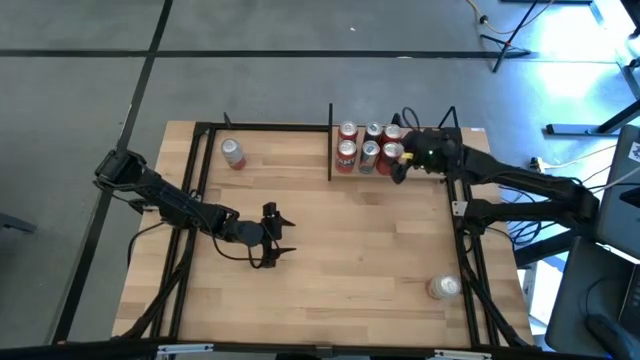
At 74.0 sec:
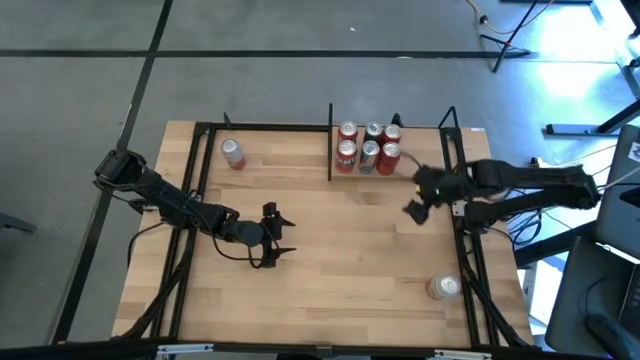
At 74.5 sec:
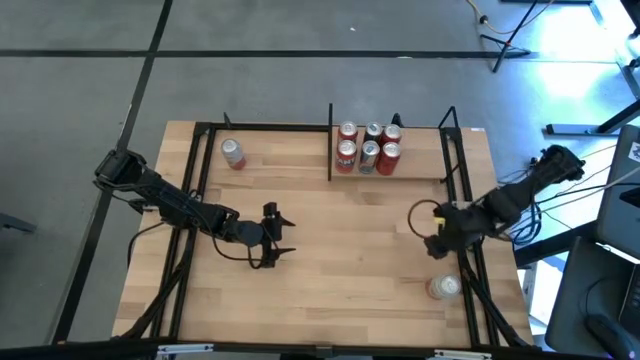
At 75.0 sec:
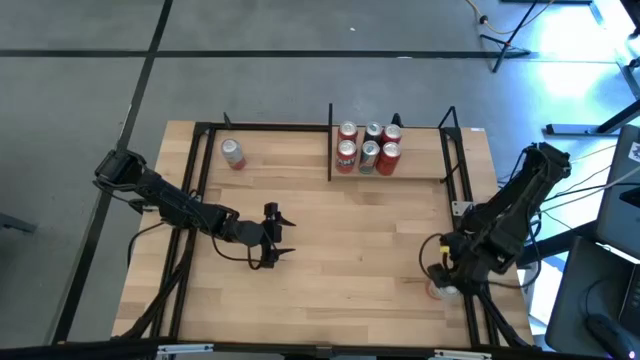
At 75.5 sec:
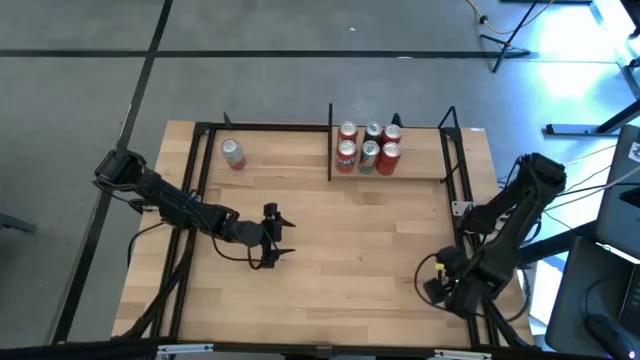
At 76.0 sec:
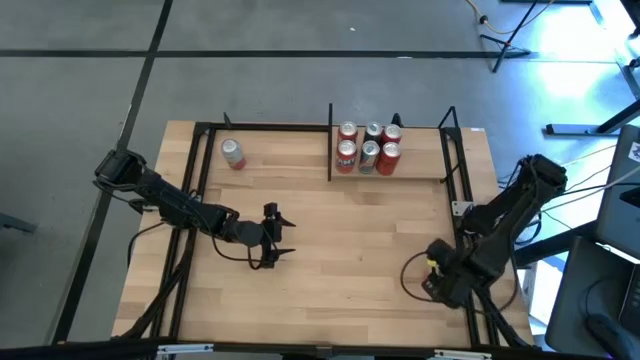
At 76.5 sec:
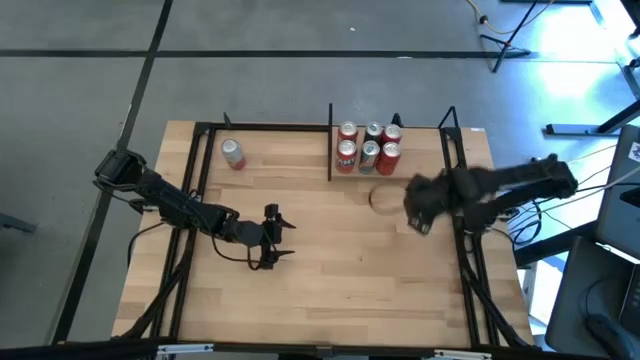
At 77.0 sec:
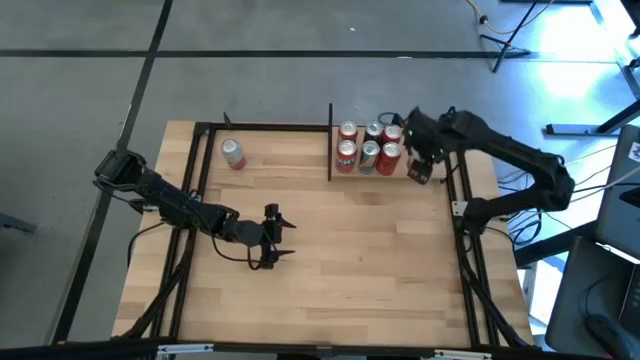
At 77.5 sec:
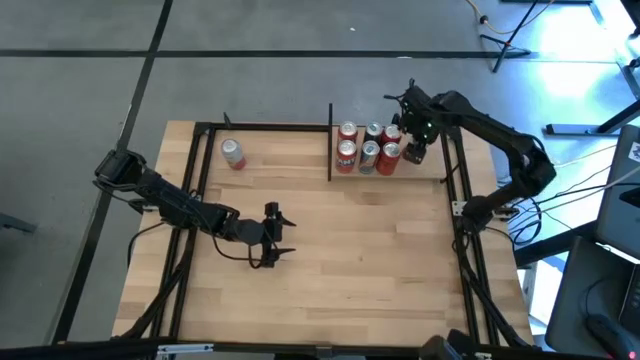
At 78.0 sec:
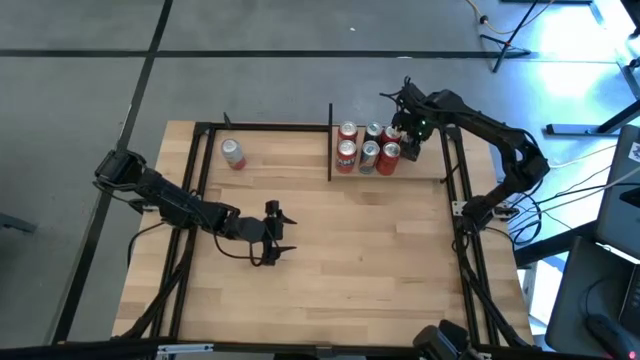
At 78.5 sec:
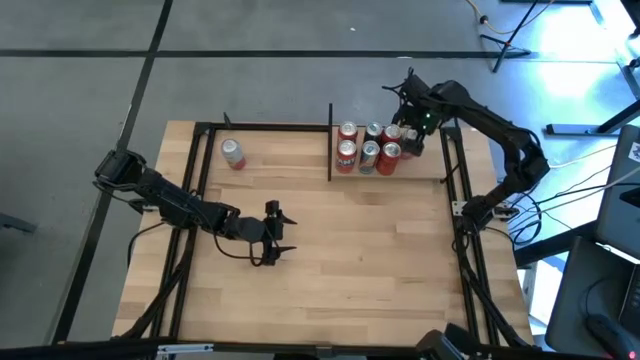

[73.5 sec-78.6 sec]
Task: Place canned beverage on shelf
Put the bottom pink soda can on the shelf

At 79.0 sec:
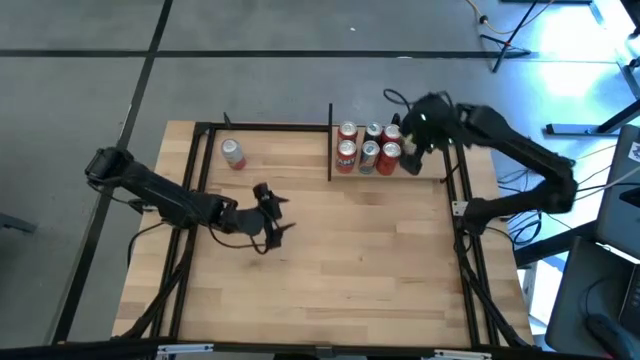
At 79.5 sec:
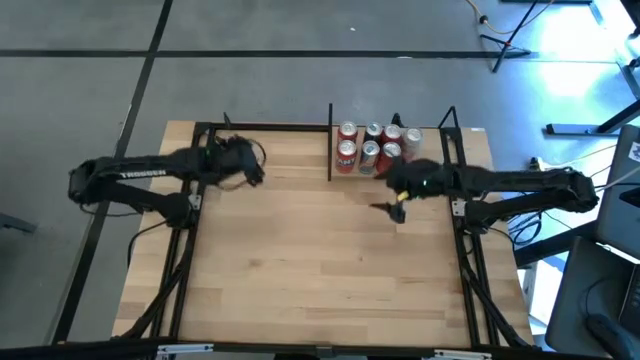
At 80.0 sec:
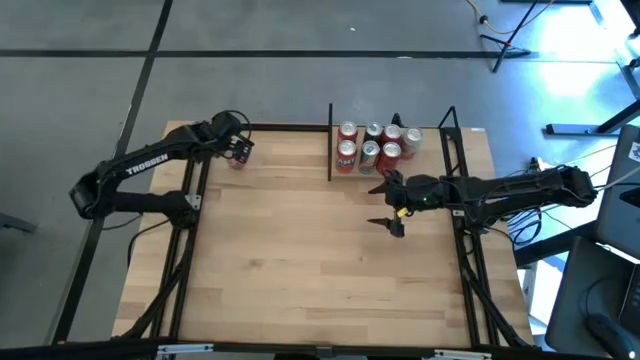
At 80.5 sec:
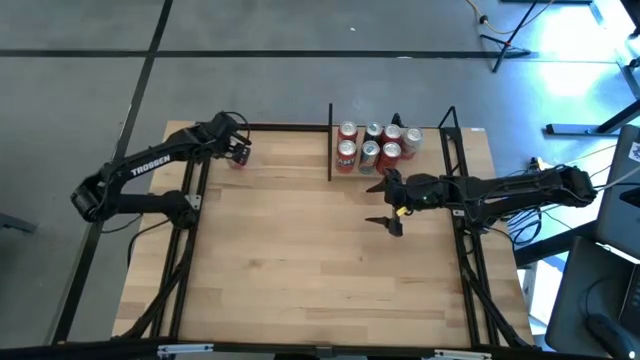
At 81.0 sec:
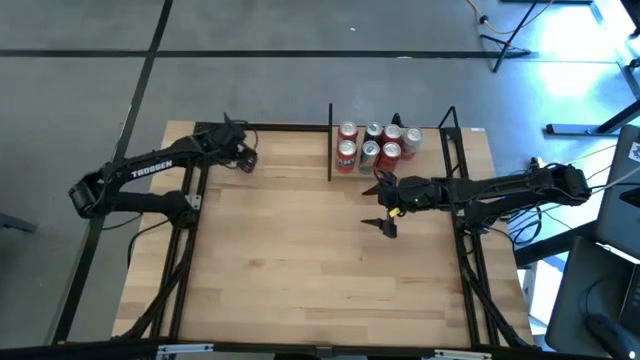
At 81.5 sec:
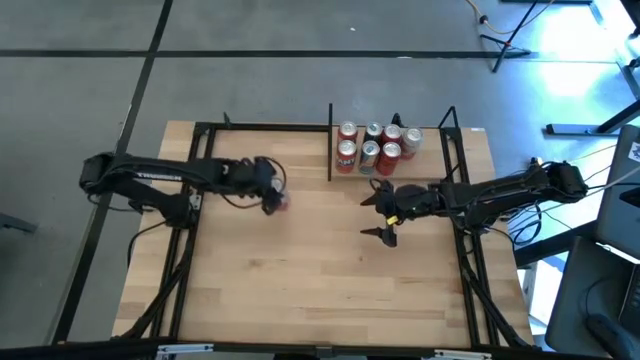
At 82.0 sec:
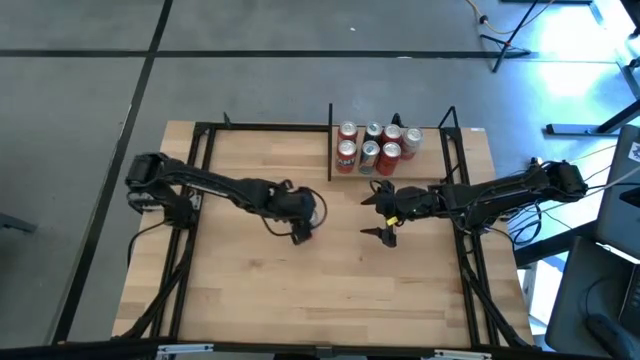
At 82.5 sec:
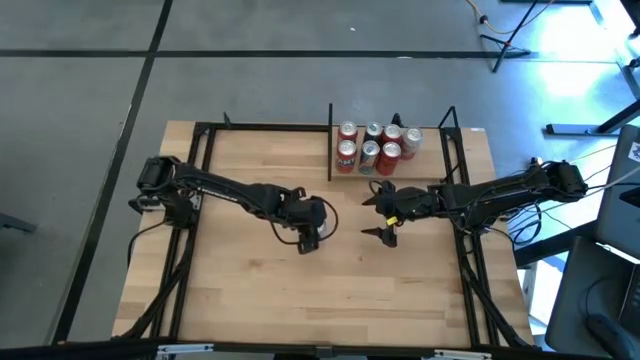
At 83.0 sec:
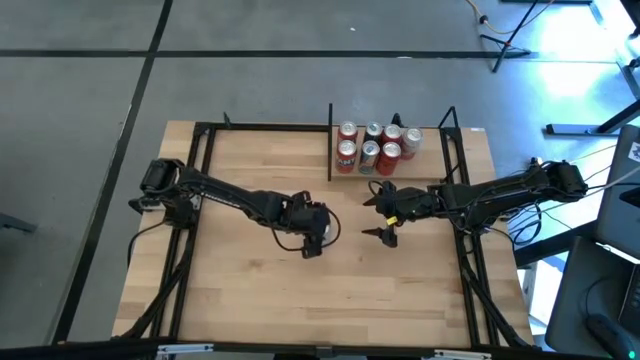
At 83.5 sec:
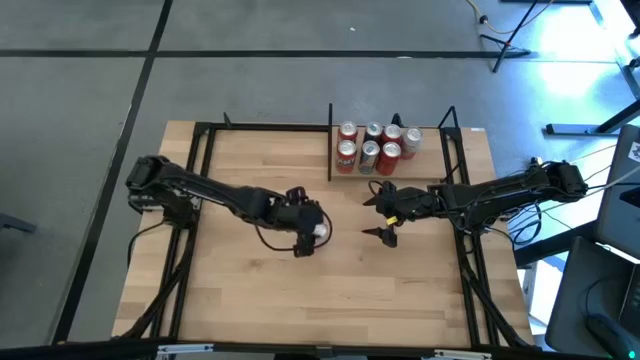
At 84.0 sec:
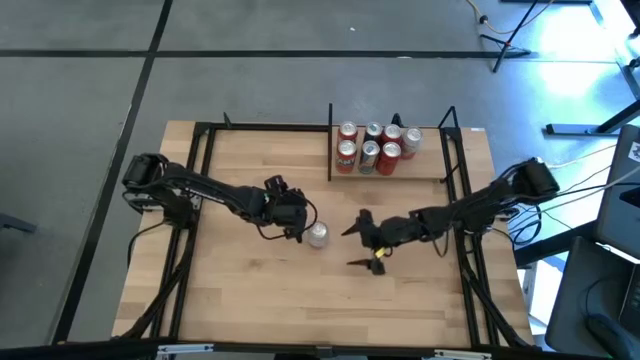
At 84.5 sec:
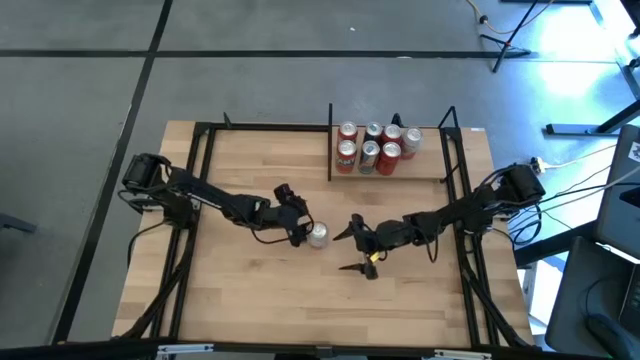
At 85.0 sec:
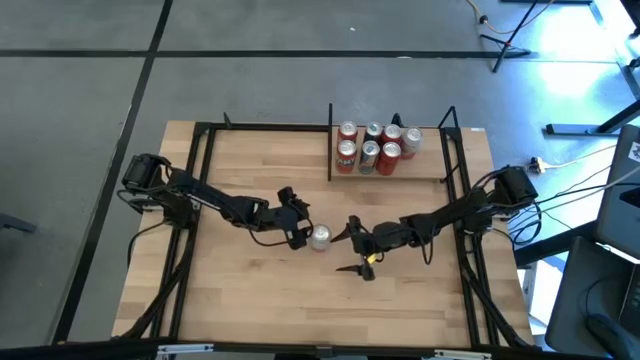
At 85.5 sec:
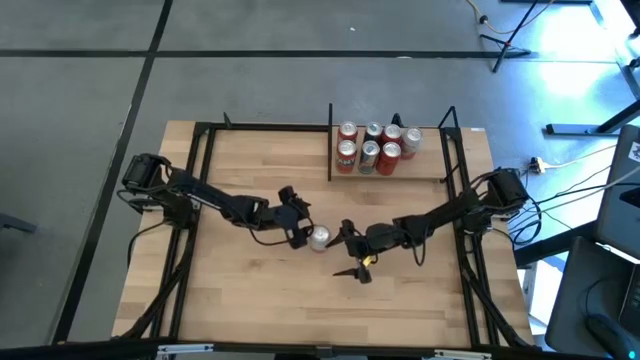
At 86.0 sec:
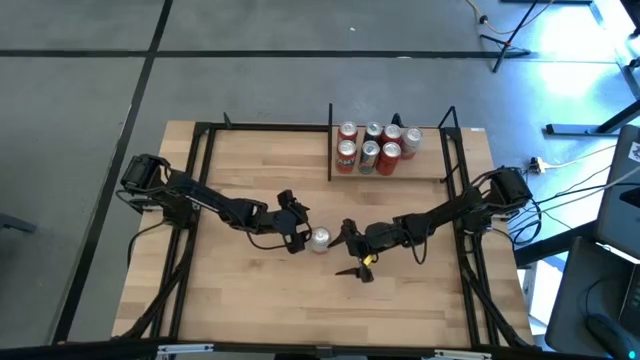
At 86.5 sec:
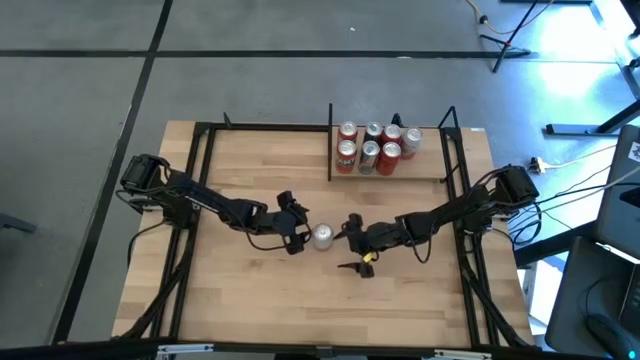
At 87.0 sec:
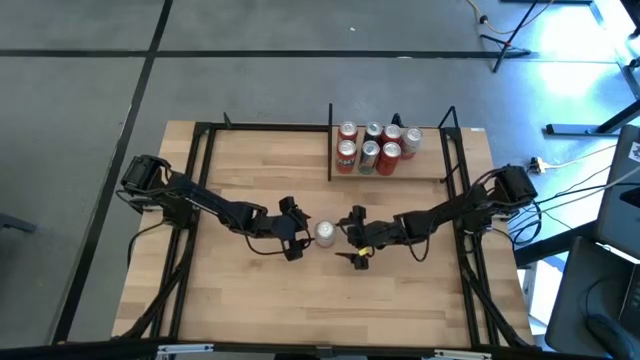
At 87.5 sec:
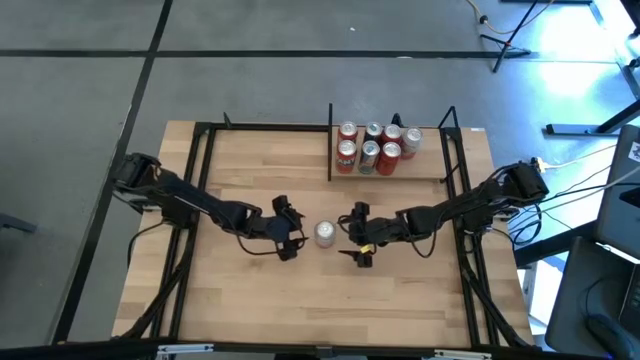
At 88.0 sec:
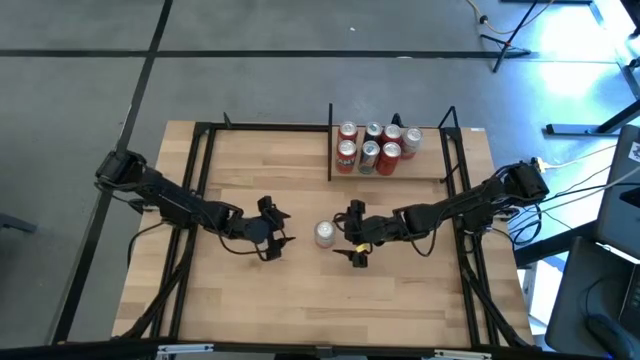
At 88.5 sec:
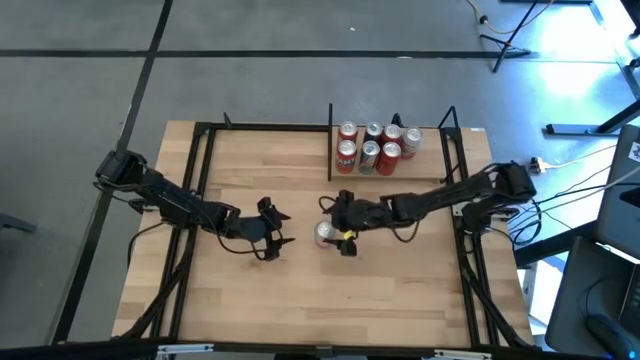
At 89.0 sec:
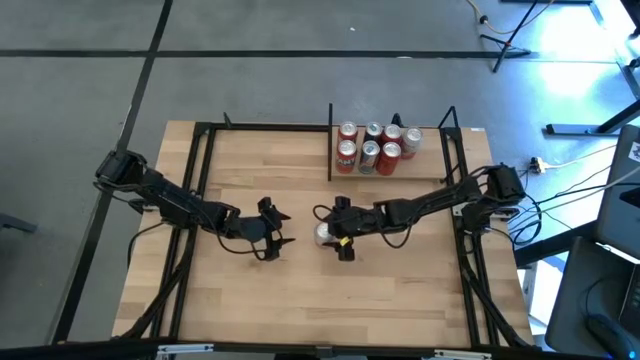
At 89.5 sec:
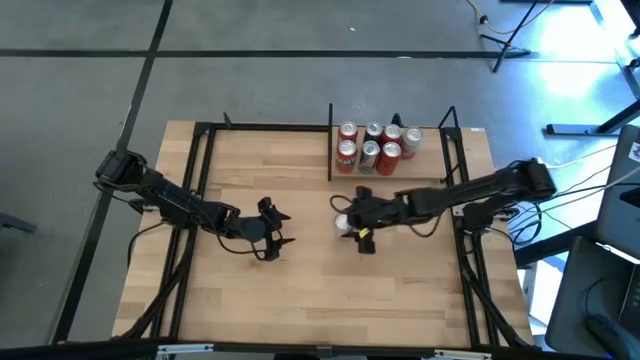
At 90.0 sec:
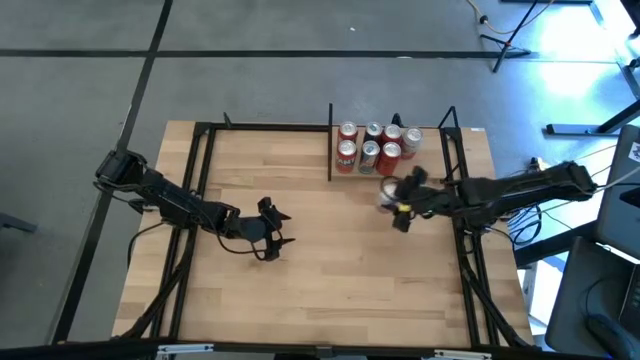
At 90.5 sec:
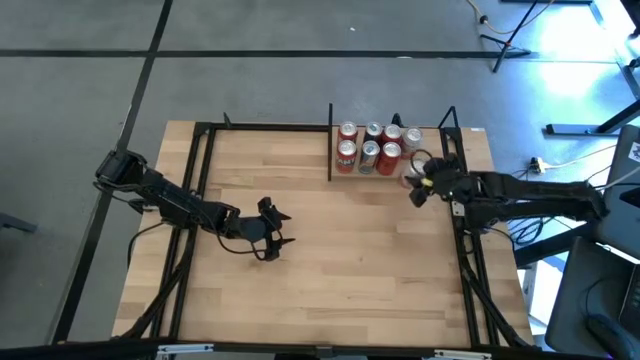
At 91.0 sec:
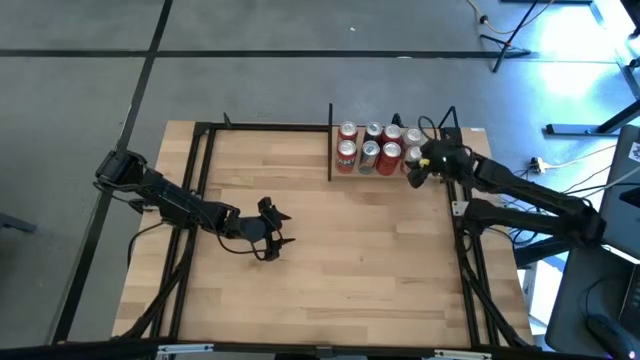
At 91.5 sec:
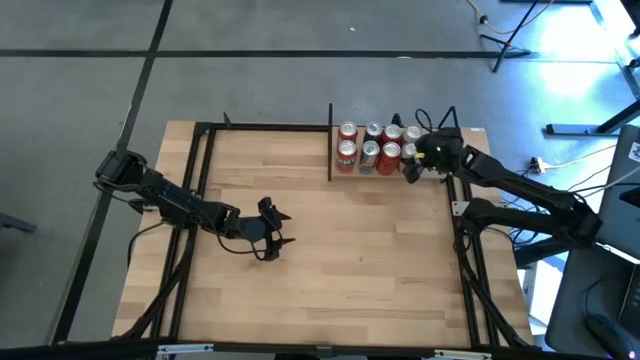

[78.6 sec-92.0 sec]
Put the pink soda can on the shelf aligned with the other pink soda can

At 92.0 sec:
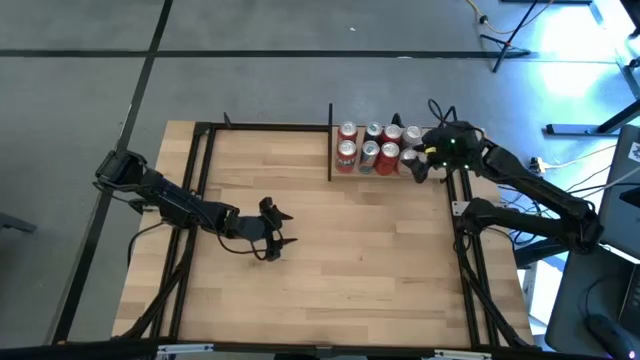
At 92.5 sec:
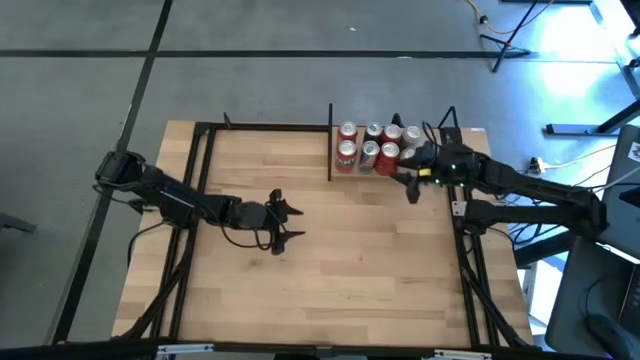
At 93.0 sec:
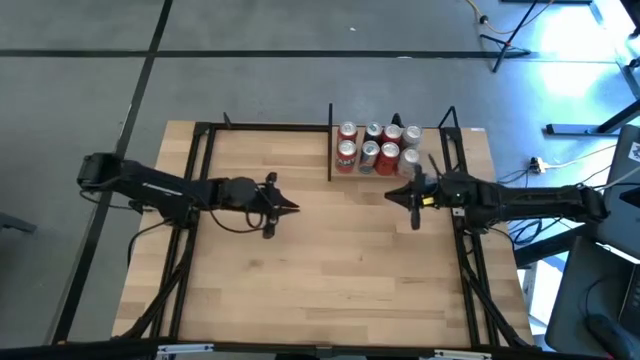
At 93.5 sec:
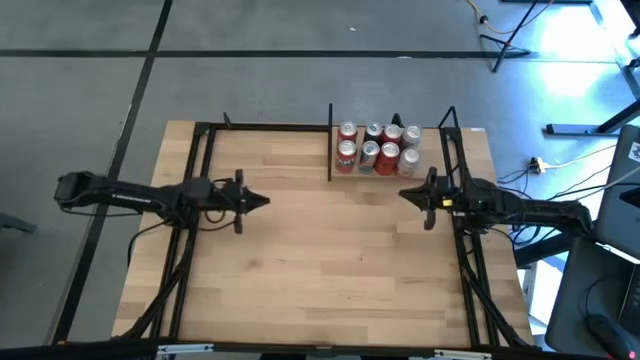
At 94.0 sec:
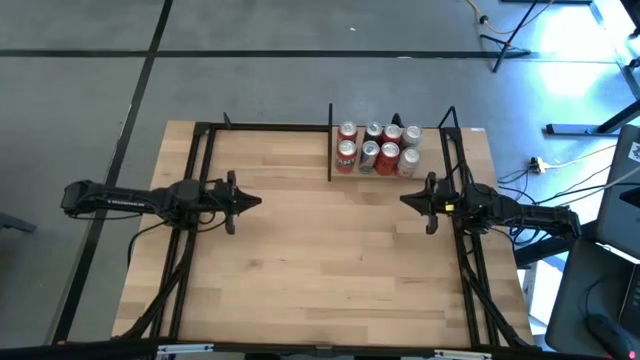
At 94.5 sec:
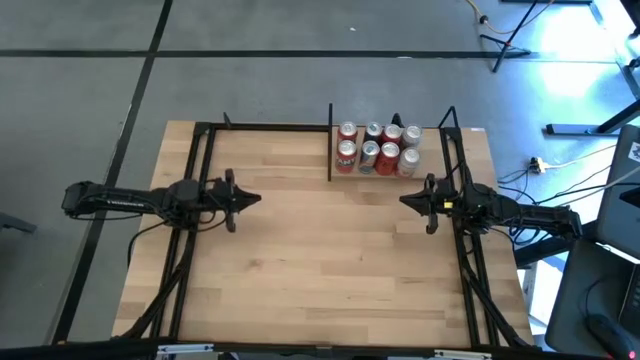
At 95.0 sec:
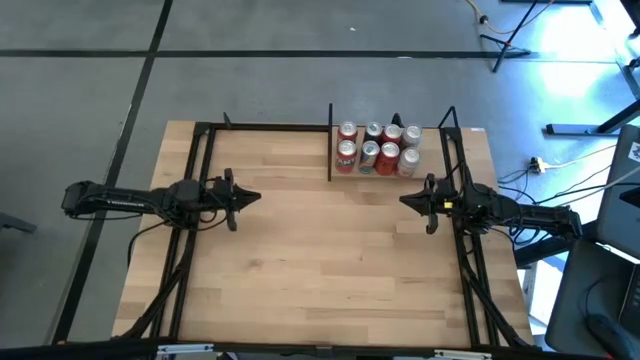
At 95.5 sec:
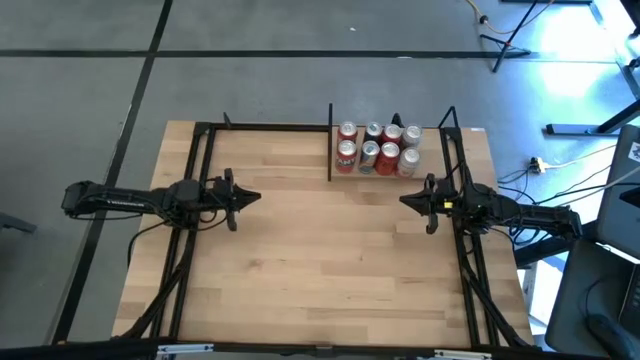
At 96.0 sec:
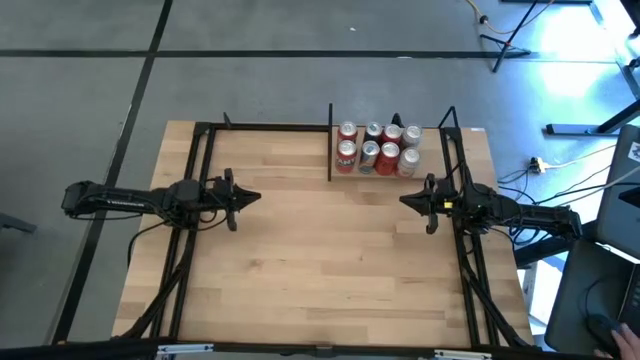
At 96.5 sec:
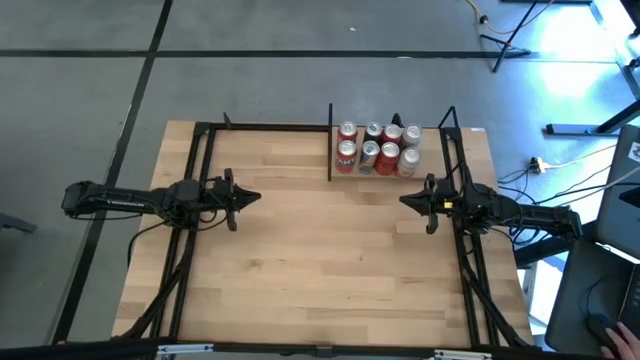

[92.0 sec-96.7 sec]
Return to Home Position
